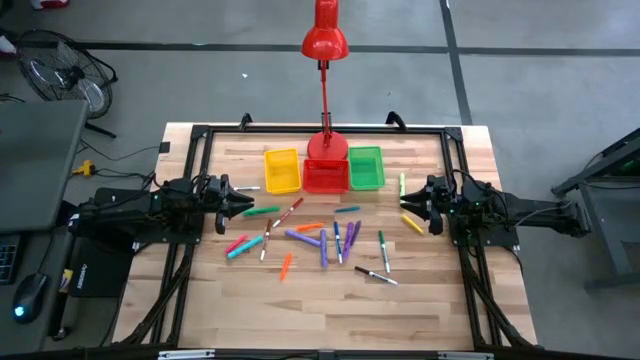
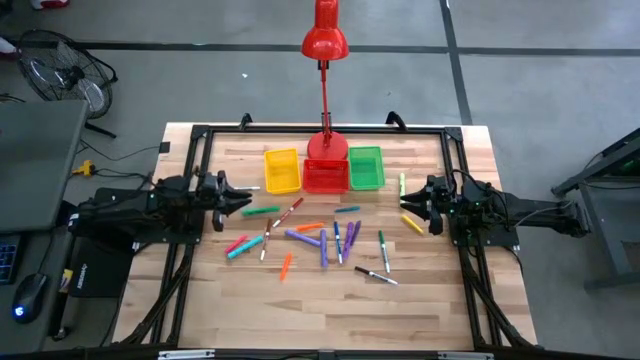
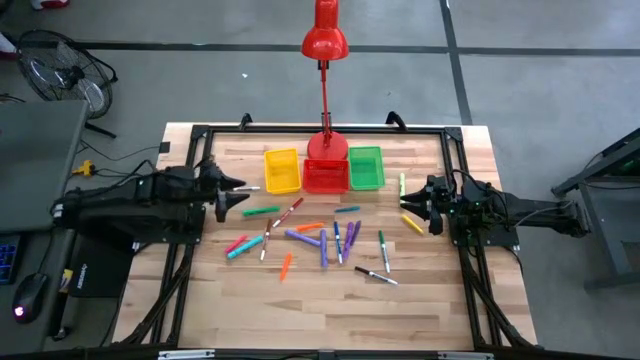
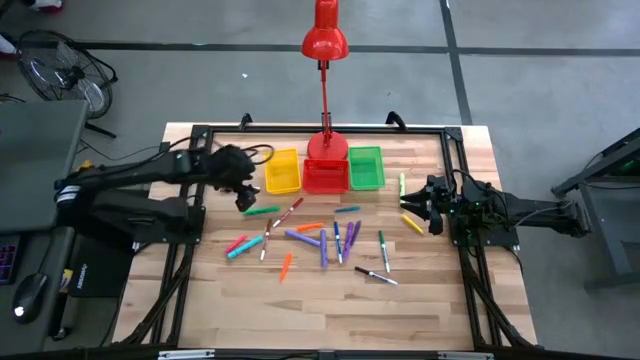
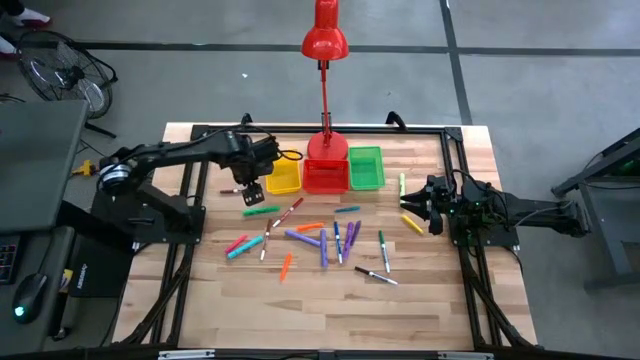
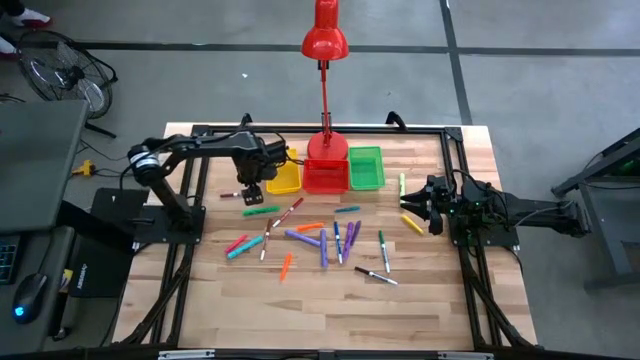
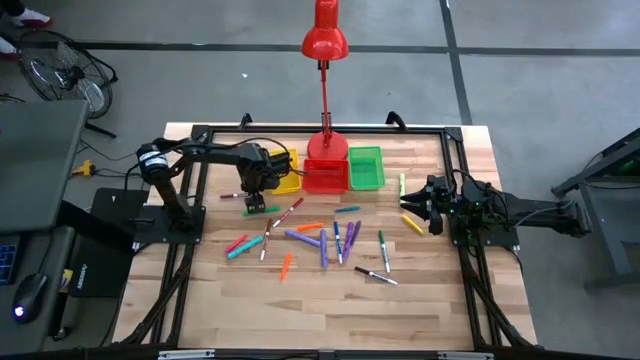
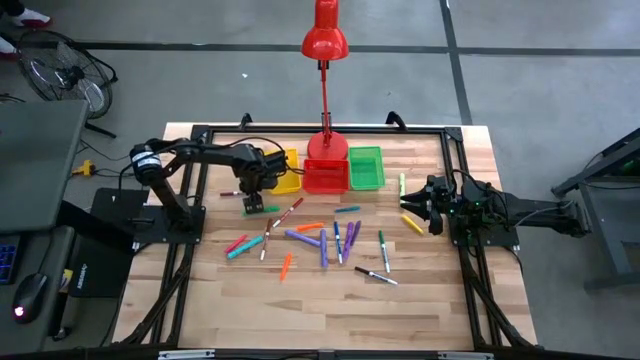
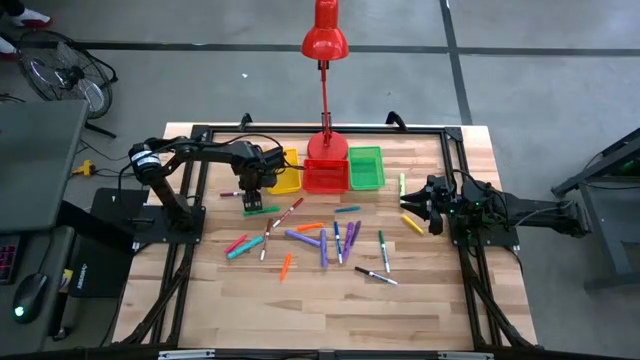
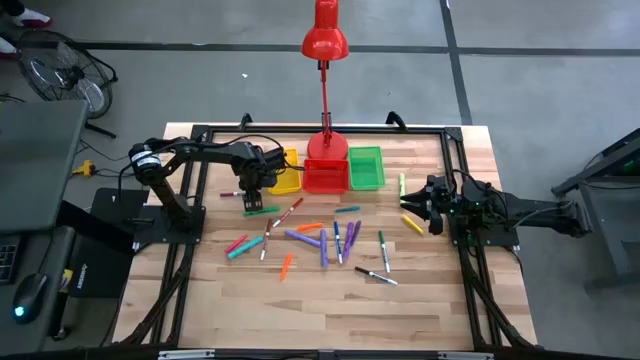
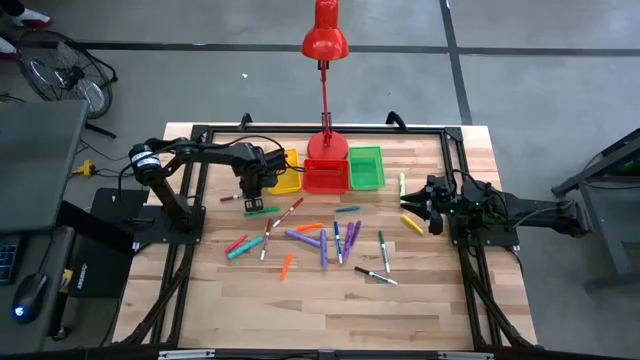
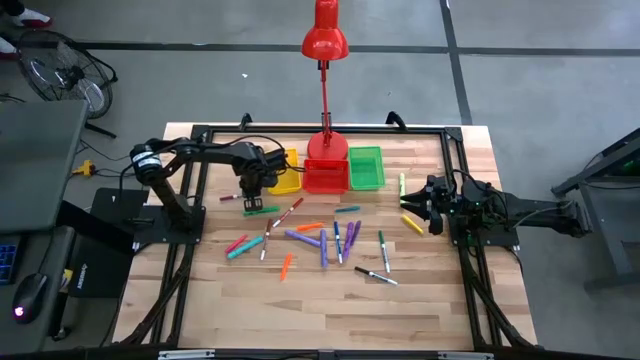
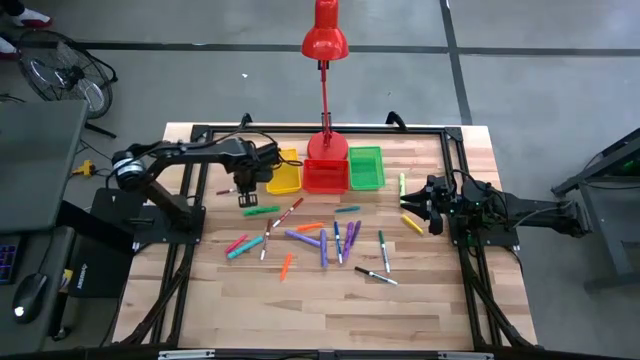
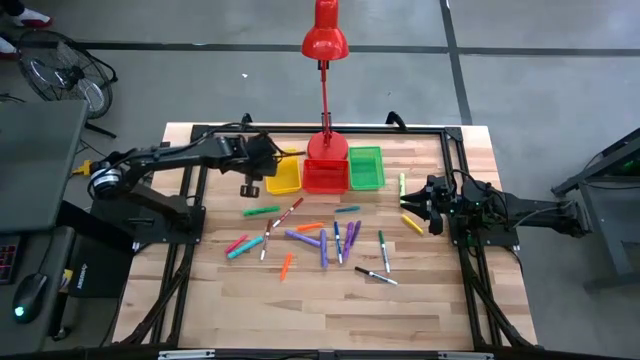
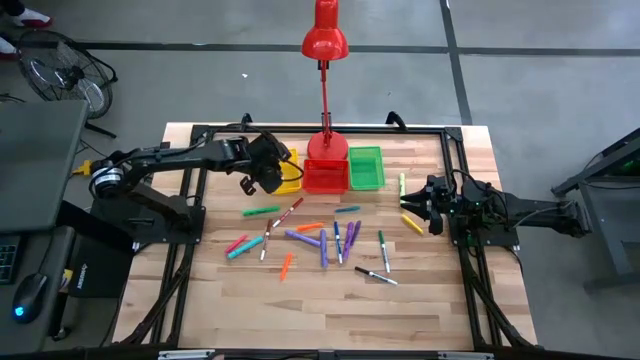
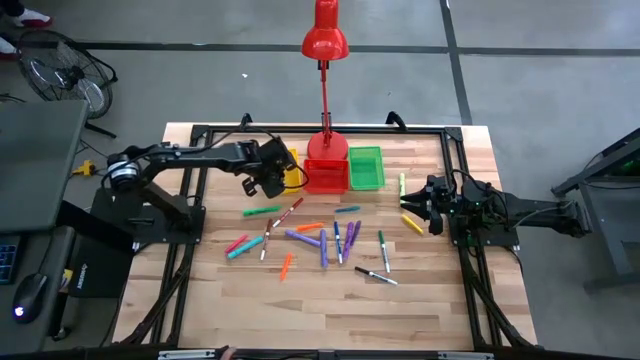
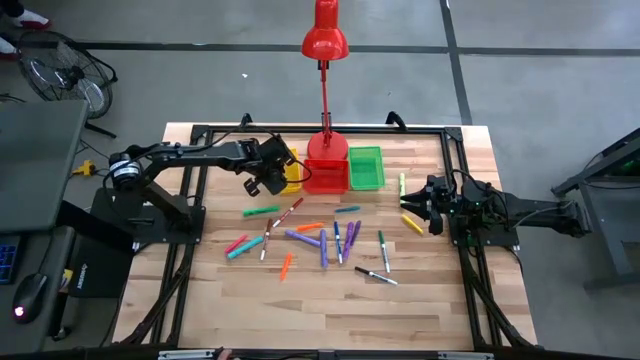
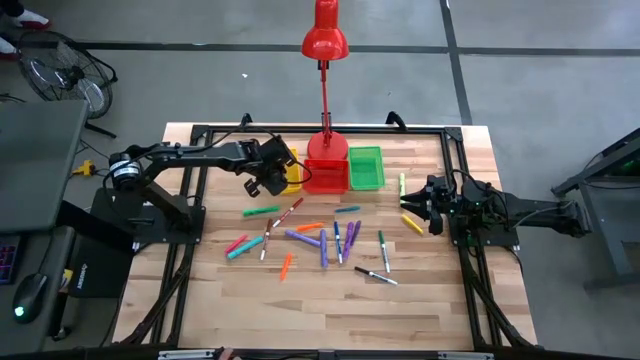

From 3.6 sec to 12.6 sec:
Task: Pick & Place Markers
Put the violet marker pen into the yellow bin

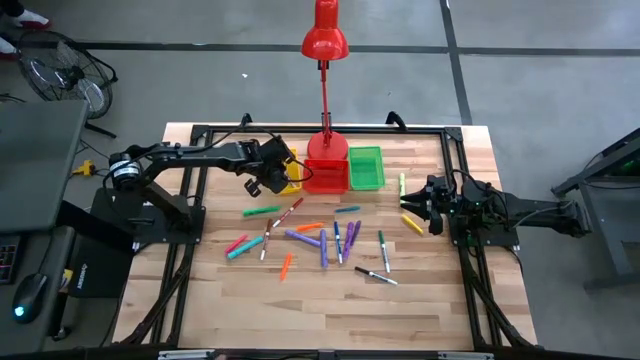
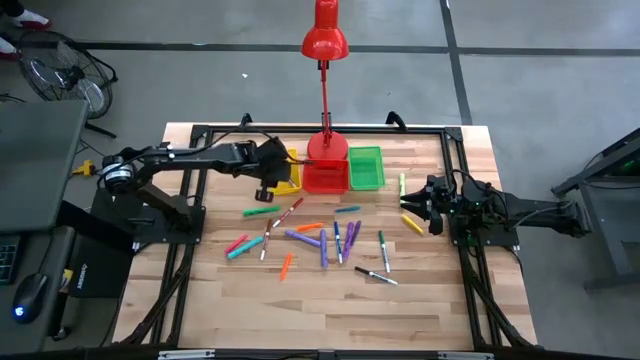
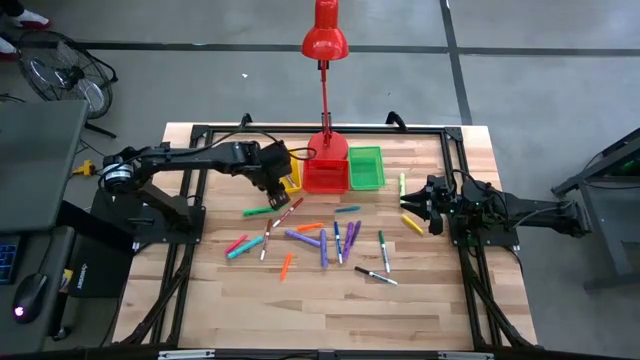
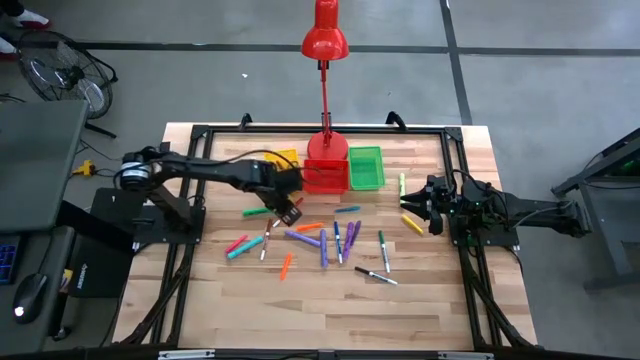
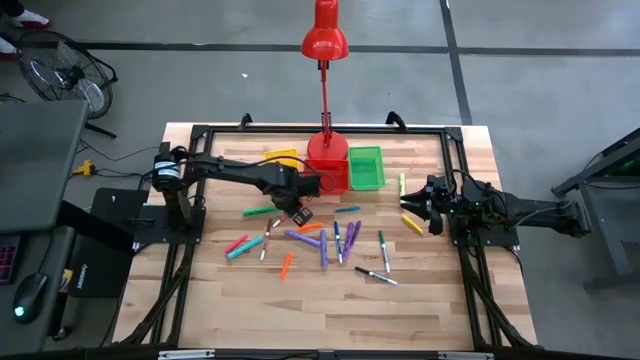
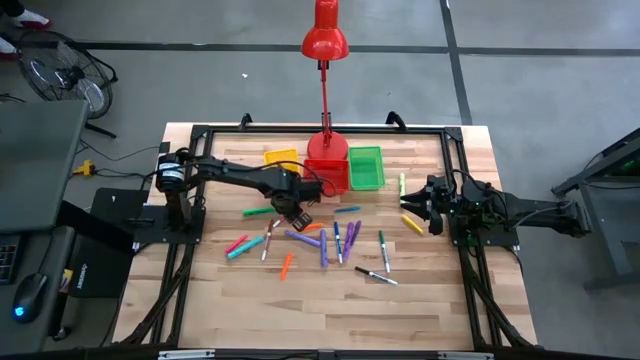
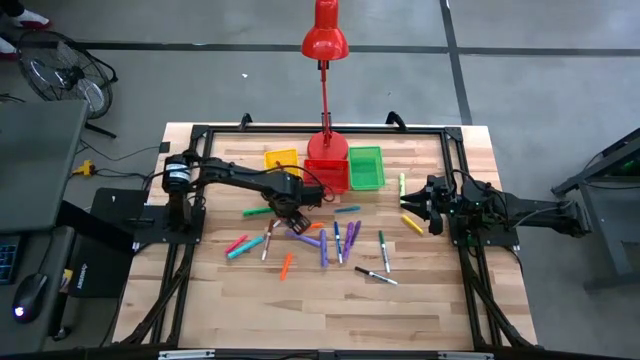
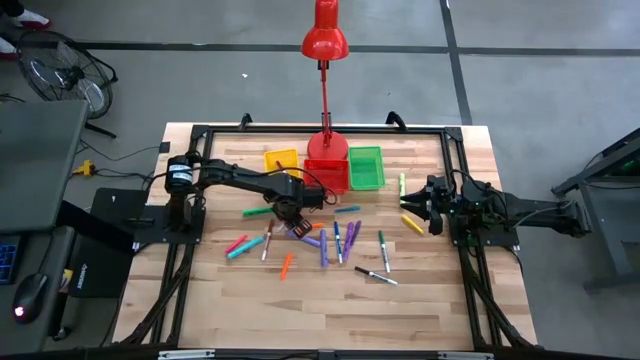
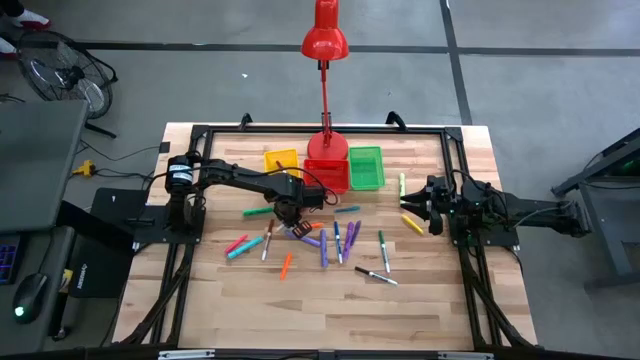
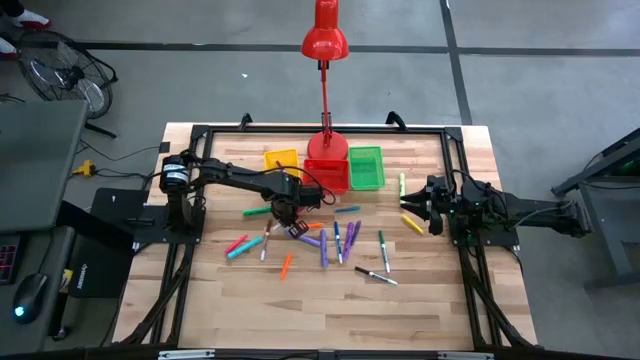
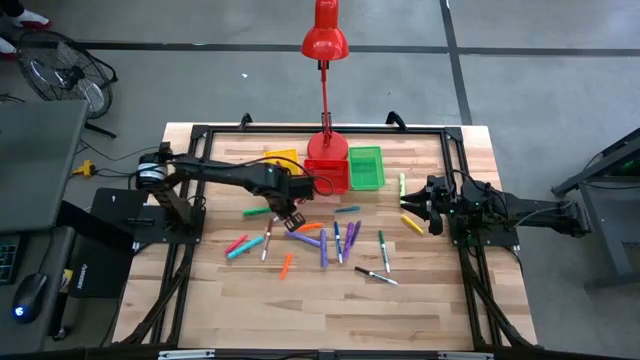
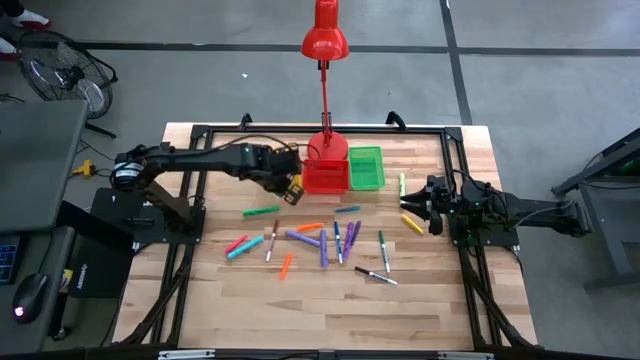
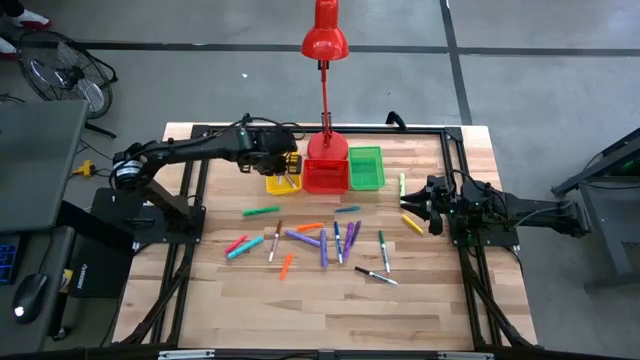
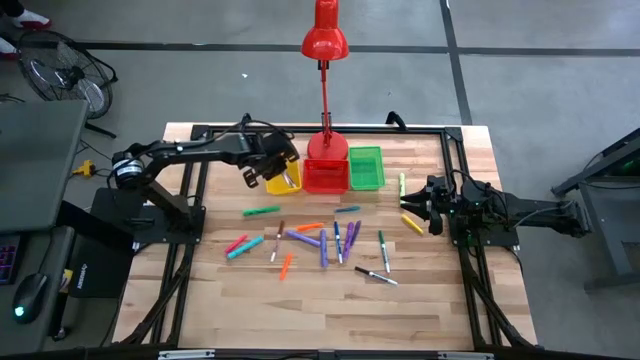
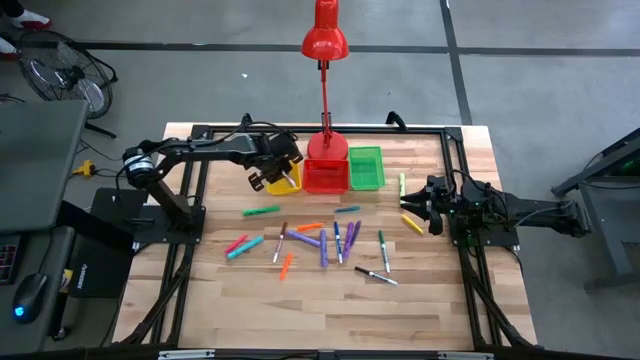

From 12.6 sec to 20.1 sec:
Put the red marker pen into the yellow bin

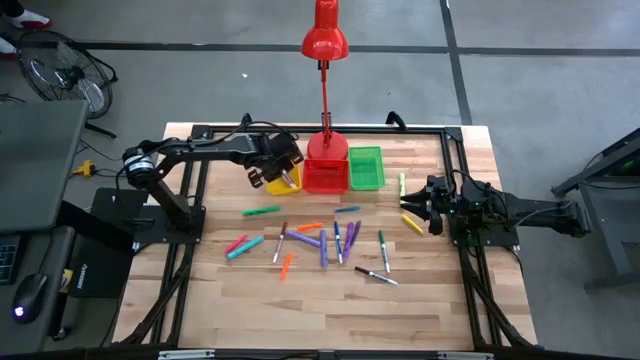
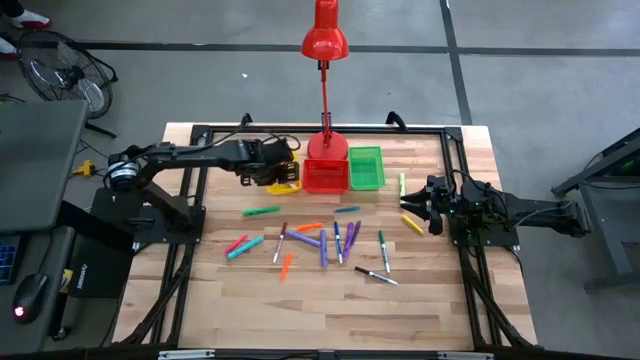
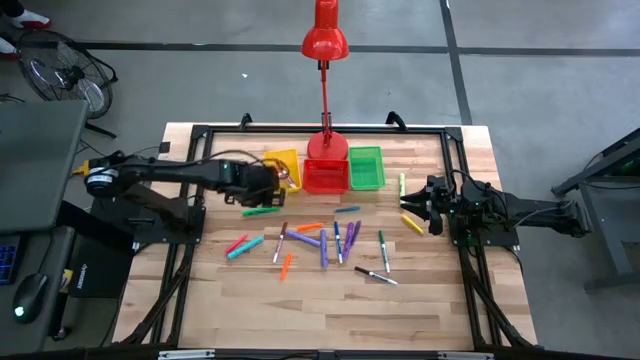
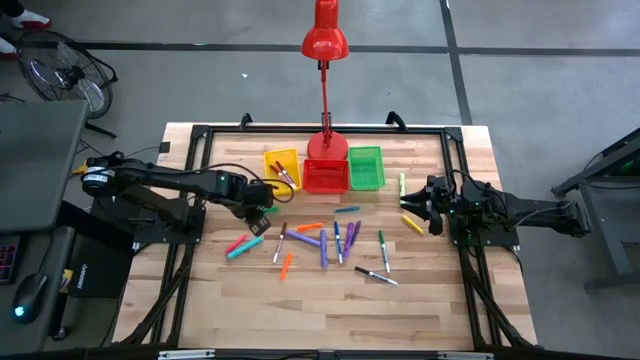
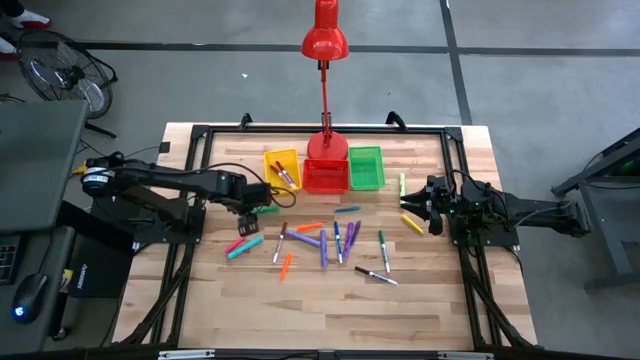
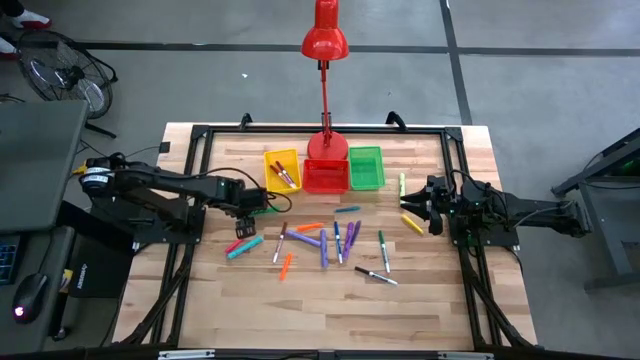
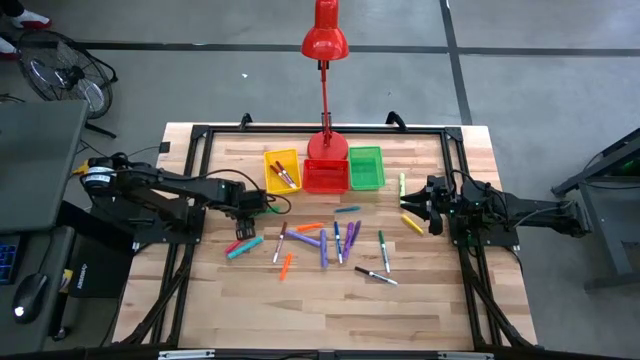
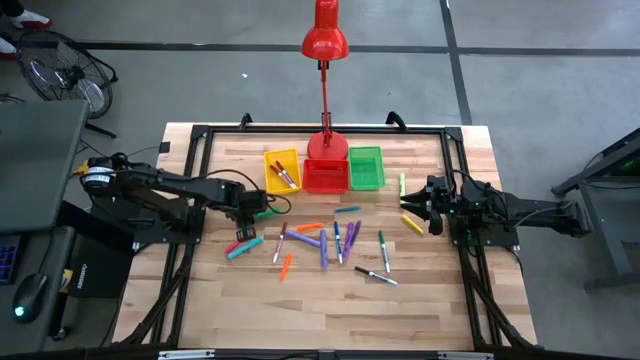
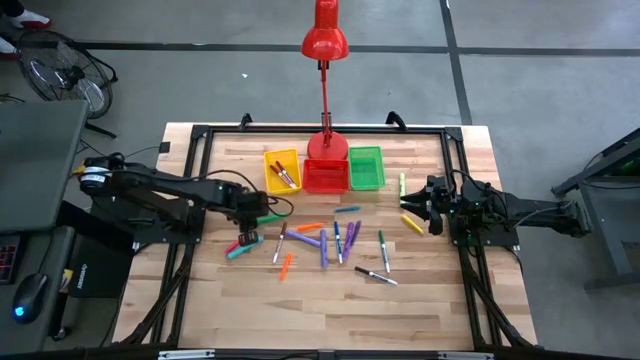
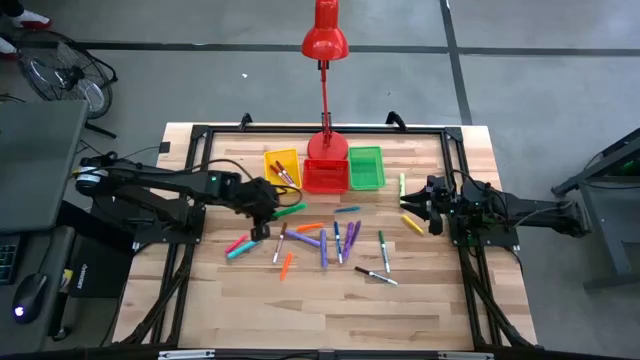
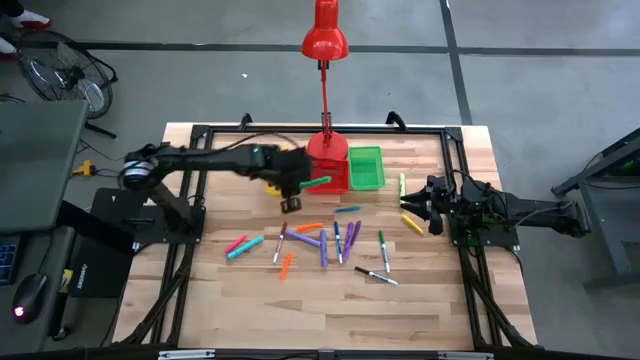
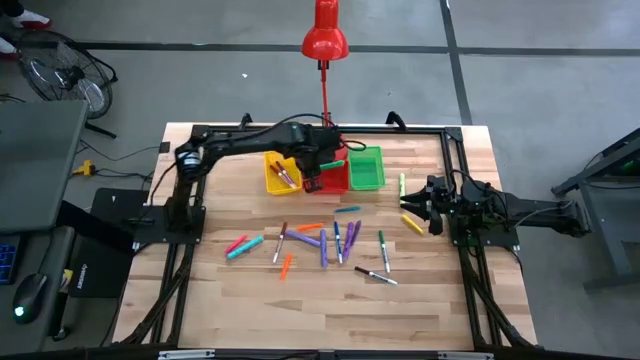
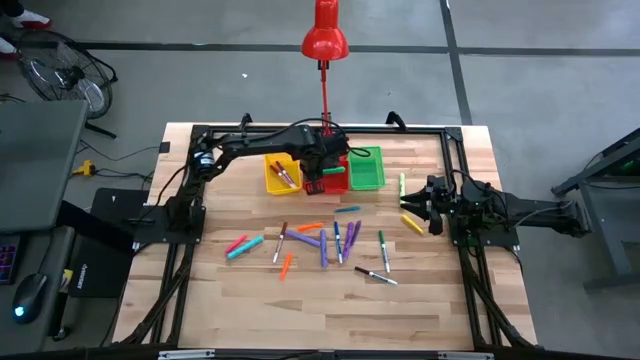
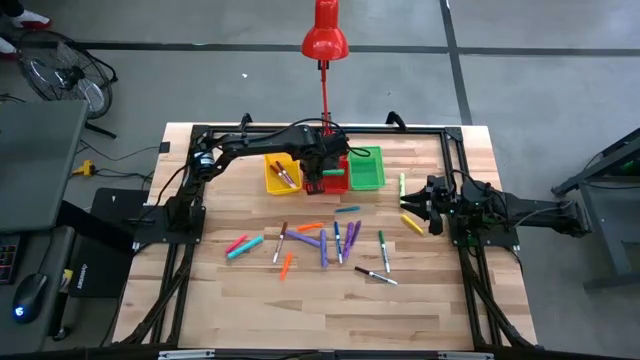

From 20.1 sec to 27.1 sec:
Put the green highlighter pen into the red bin
